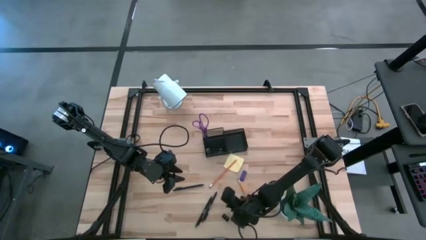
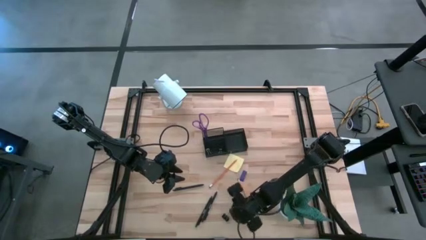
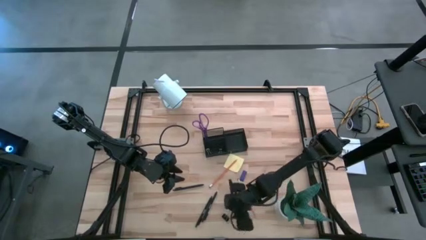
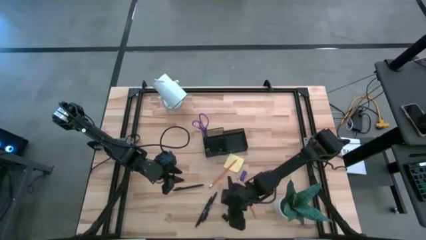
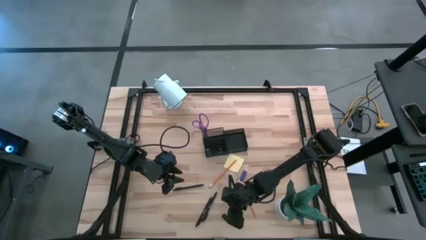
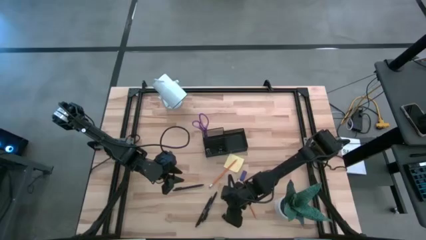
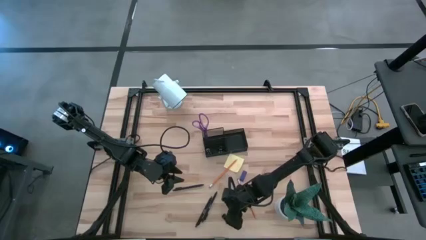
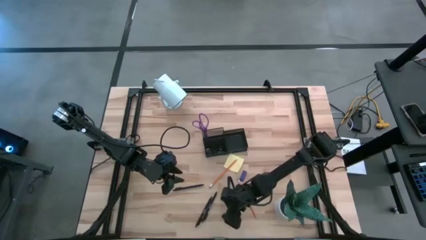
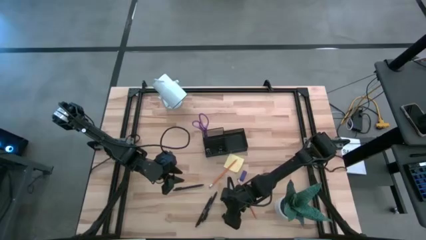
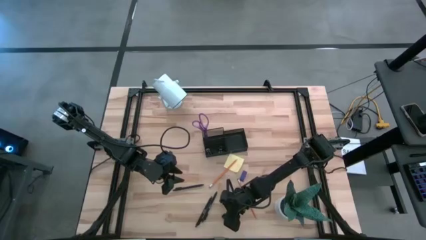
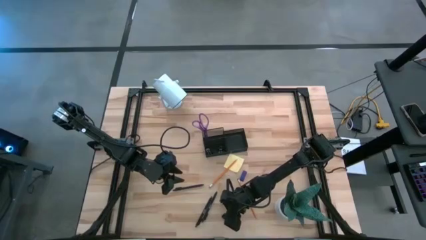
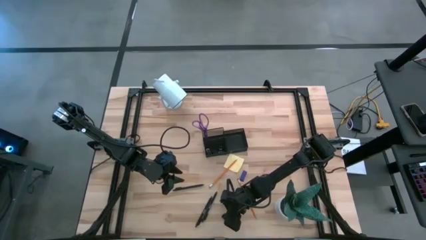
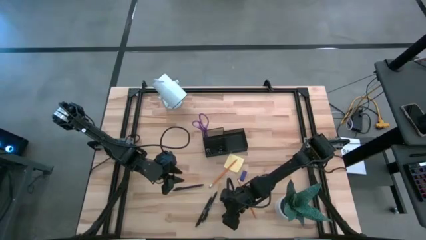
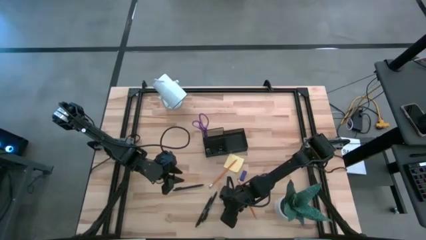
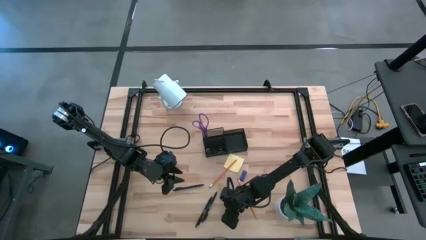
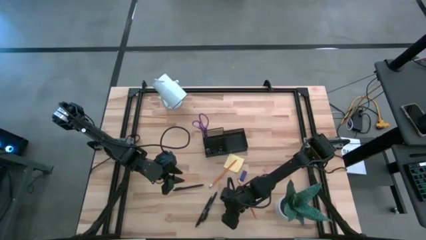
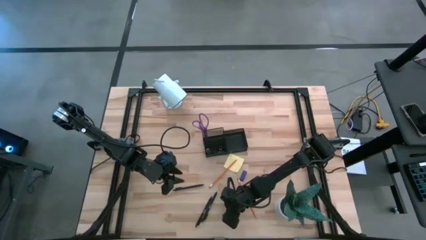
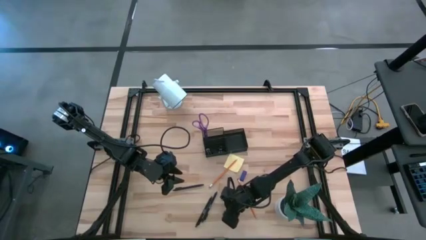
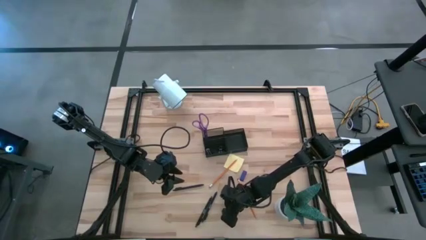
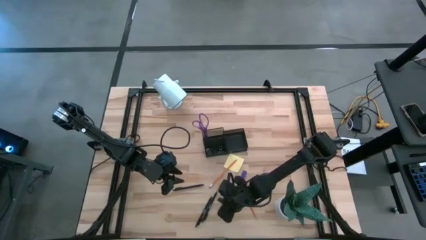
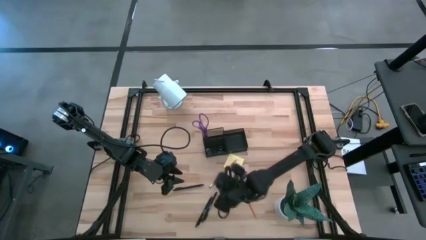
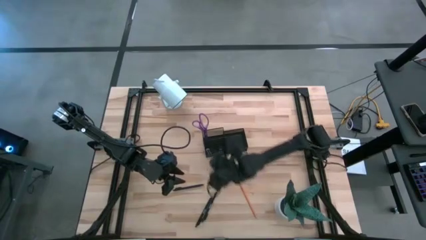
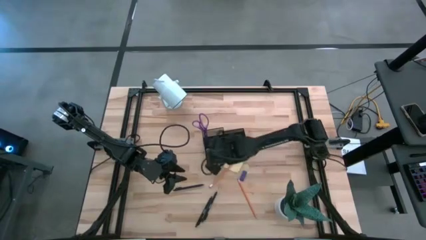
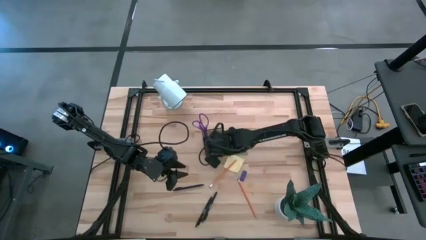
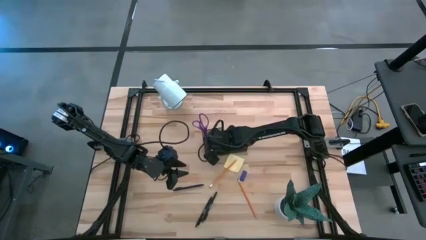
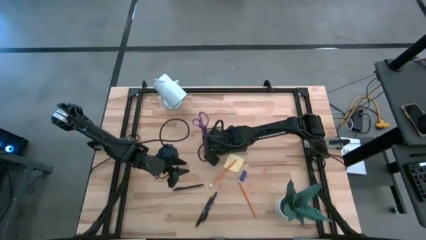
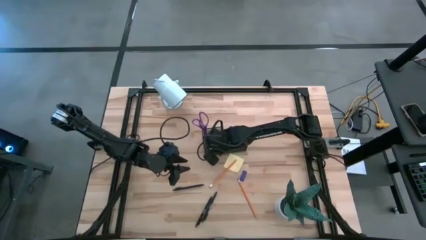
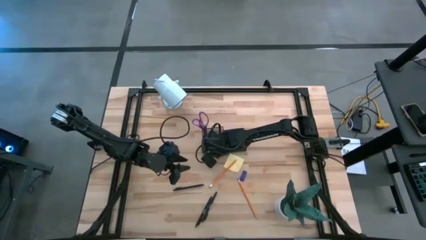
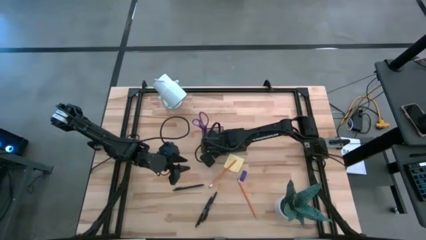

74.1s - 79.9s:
Task: Pick and place office supplies into organizer
Put the black binder clip into the black desk organizer

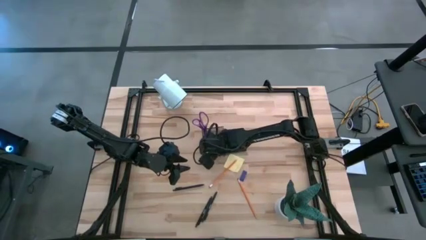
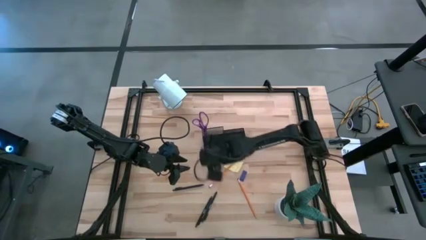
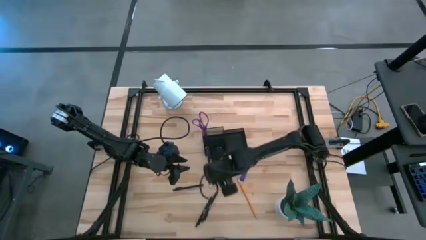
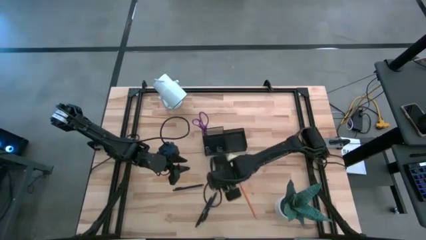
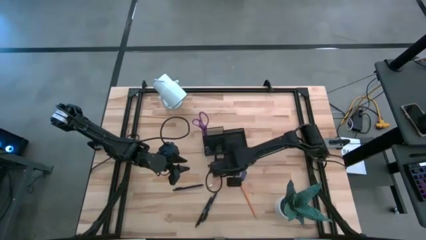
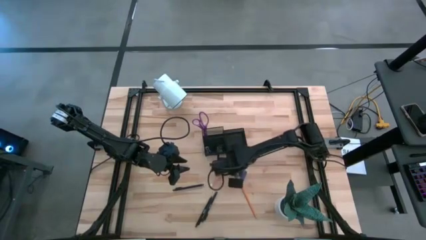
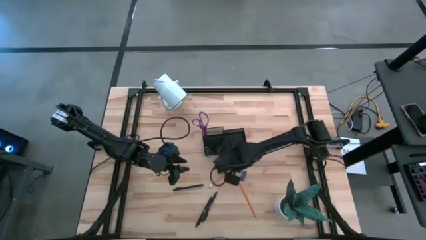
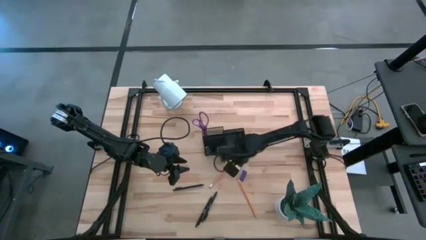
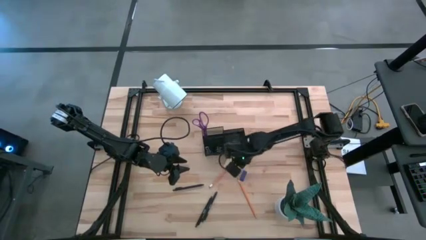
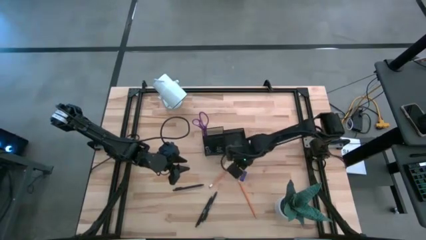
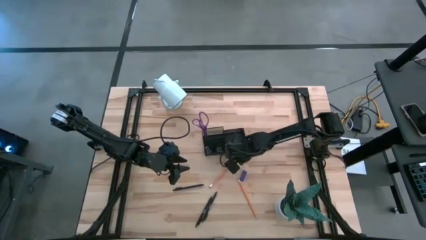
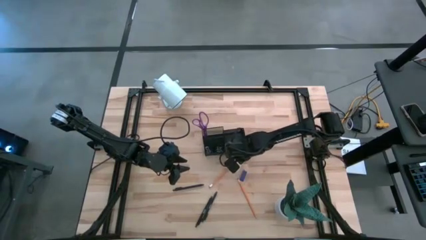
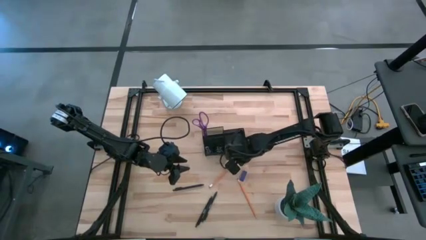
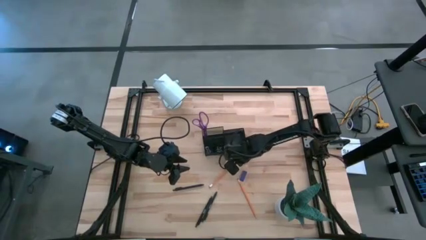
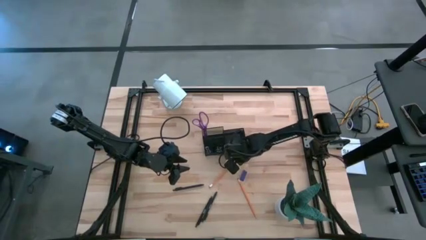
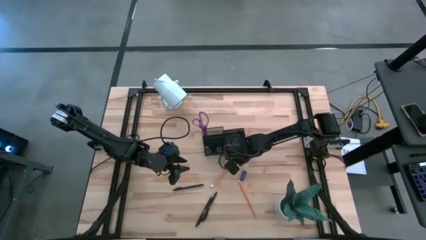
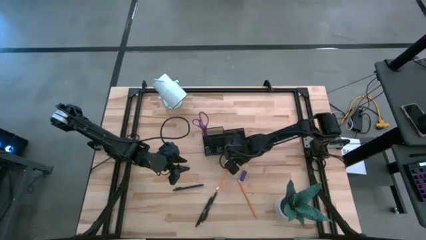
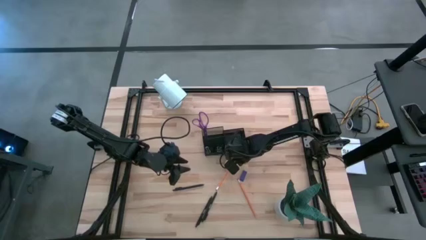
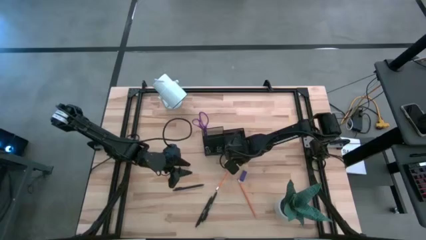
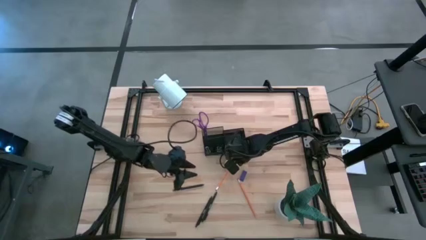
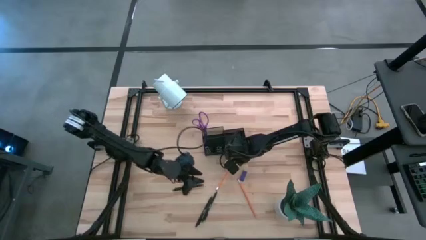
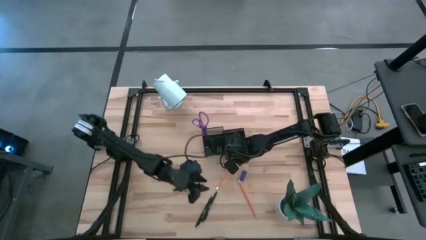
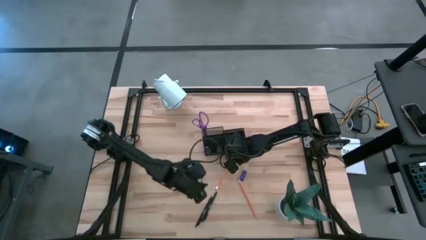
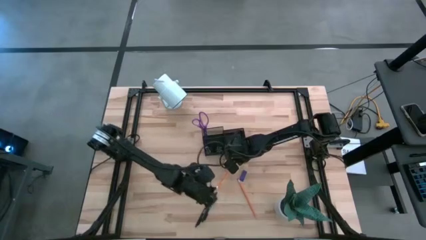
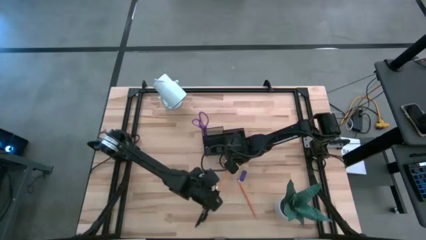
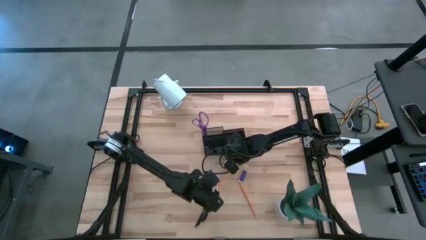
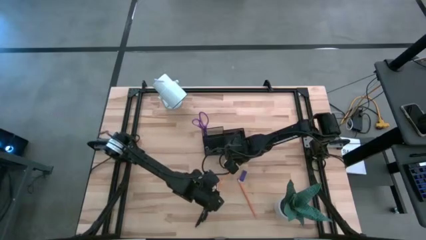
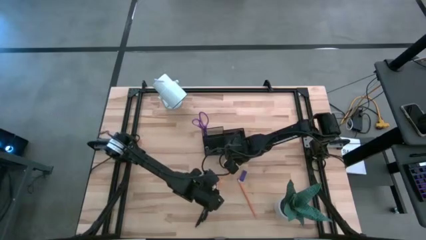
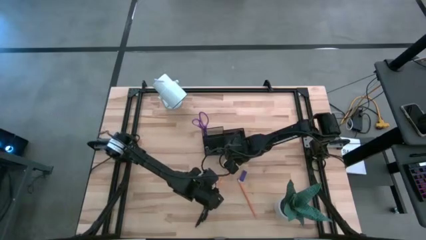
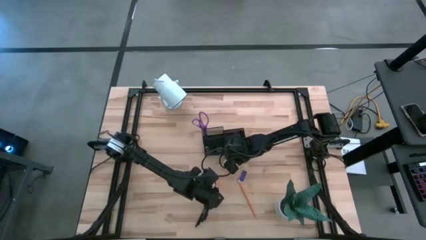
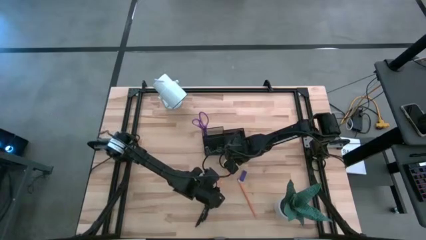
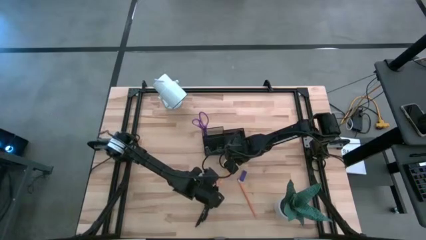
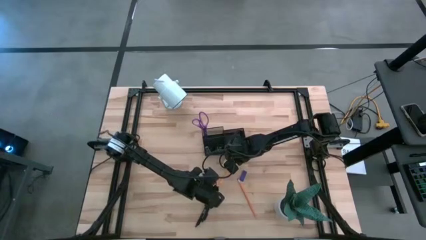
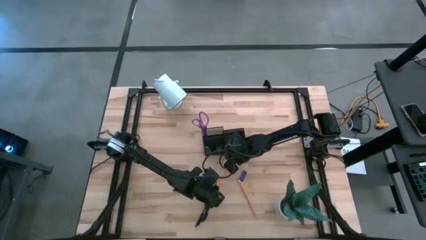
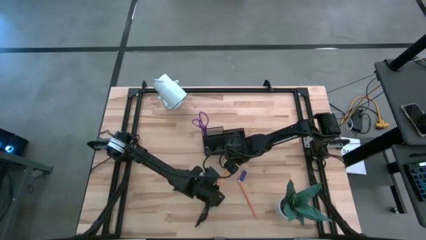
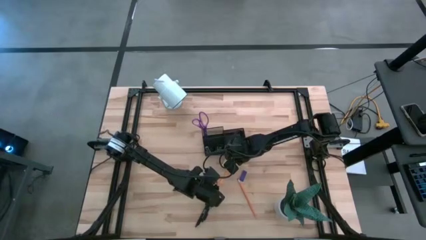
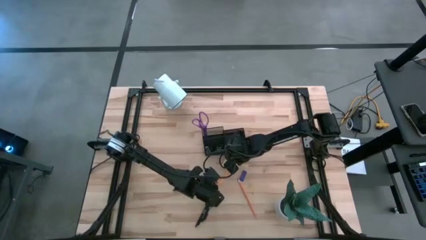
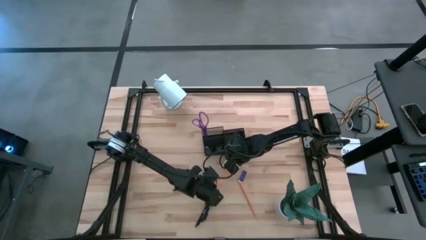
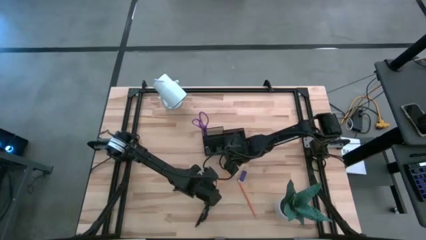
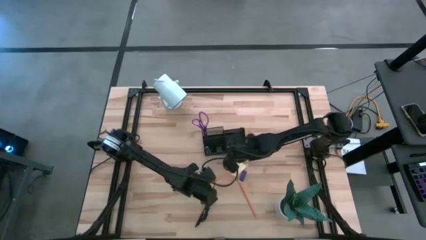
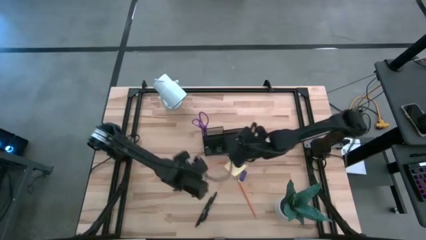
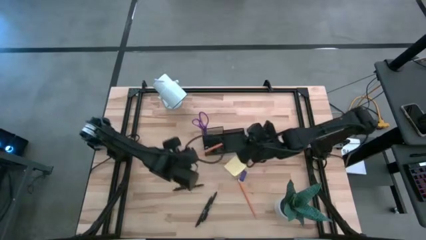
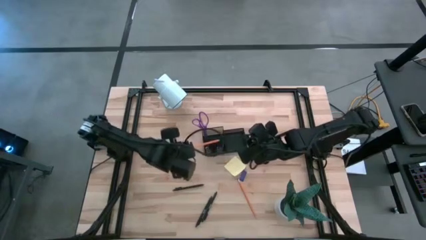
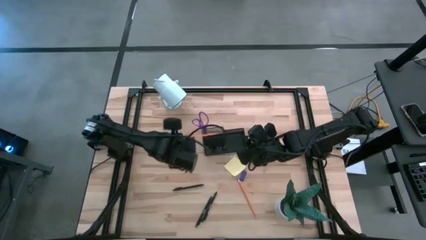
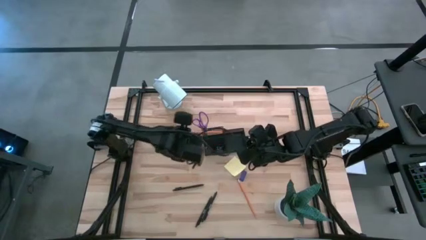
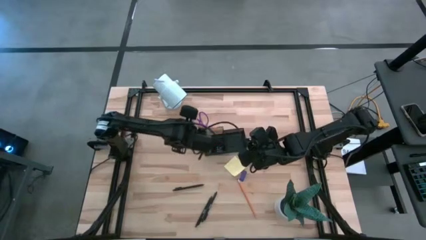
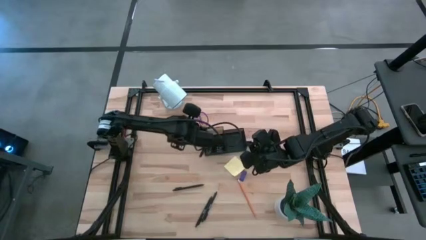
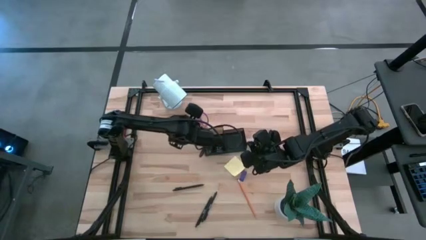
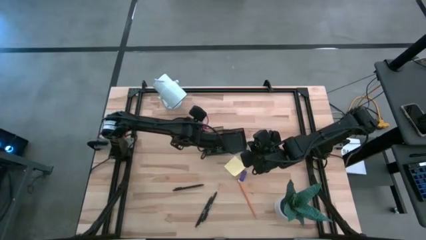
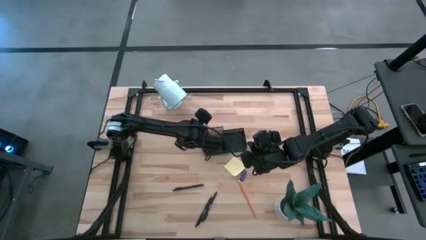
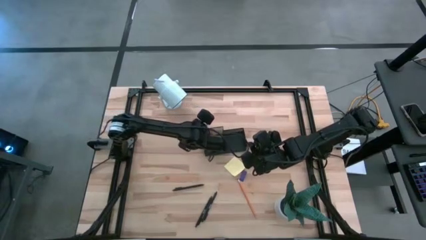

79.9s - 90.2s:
Put the top orange pencil into the black desk organizer

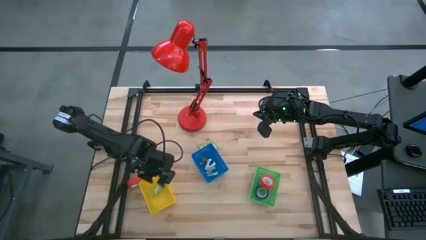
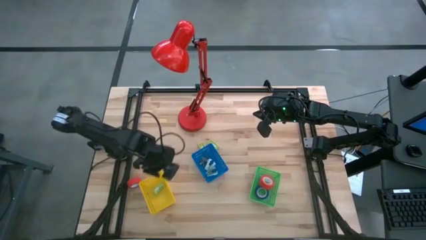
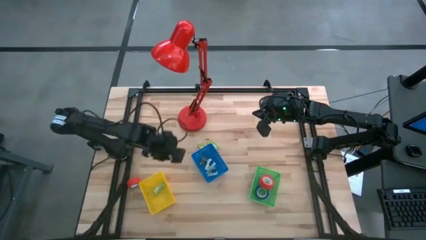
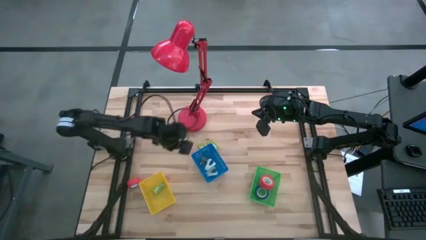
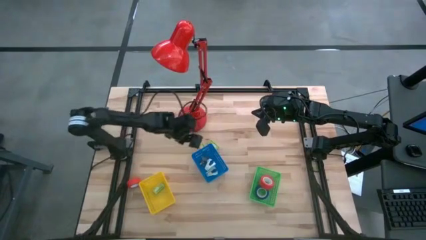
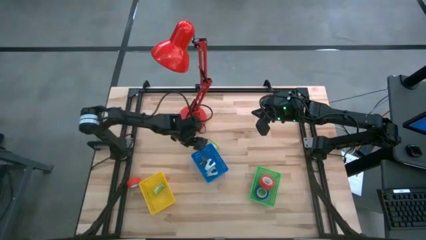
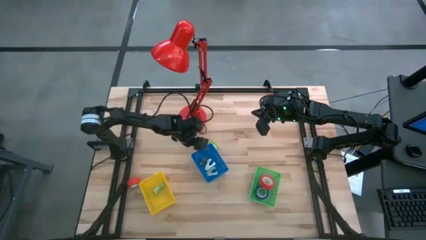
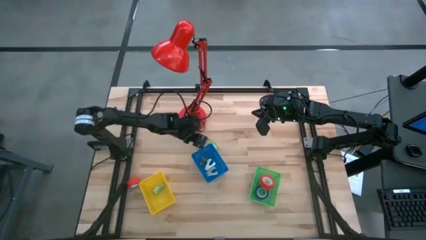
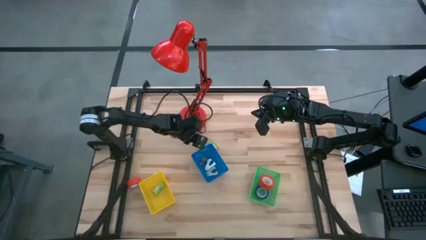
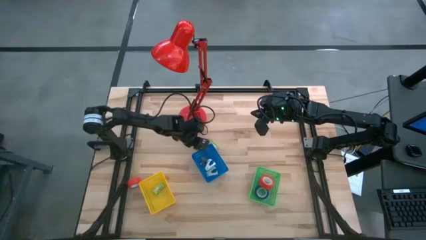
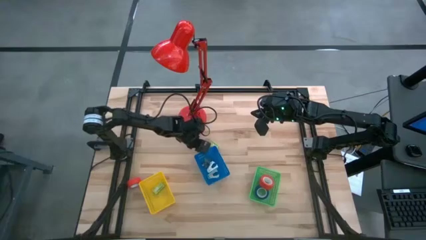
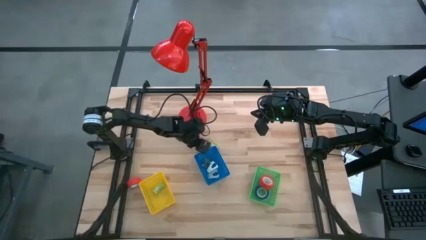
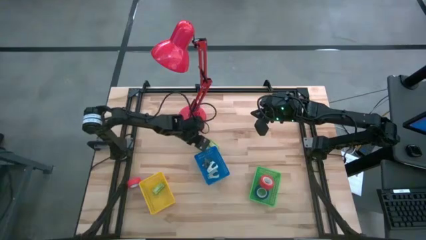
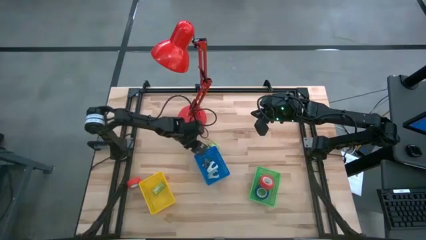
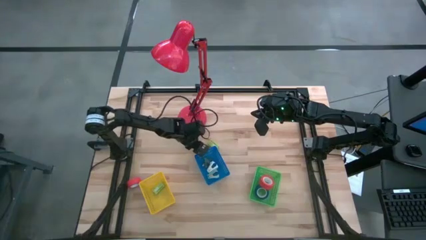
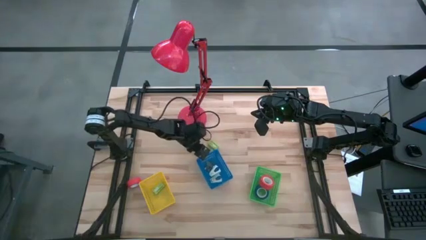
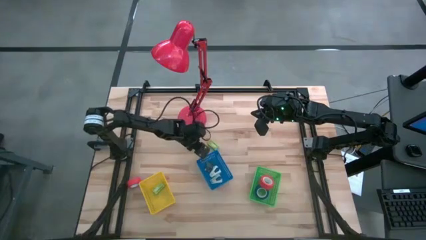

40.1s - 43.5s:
Task: Pick and place Stapler, Stapler remover, tape
Adjust the blue bin
